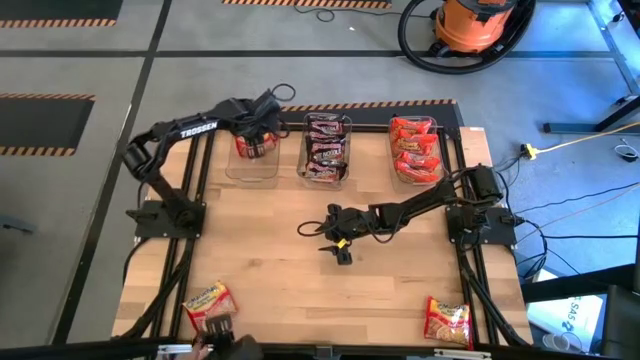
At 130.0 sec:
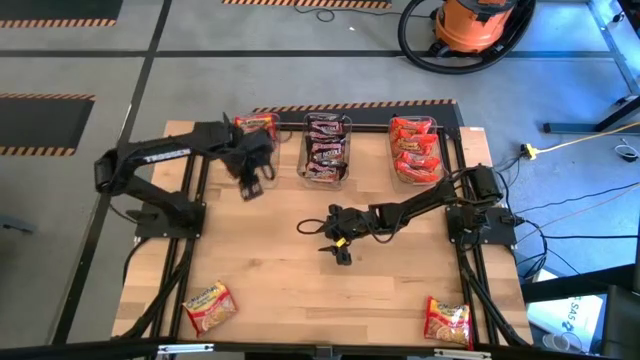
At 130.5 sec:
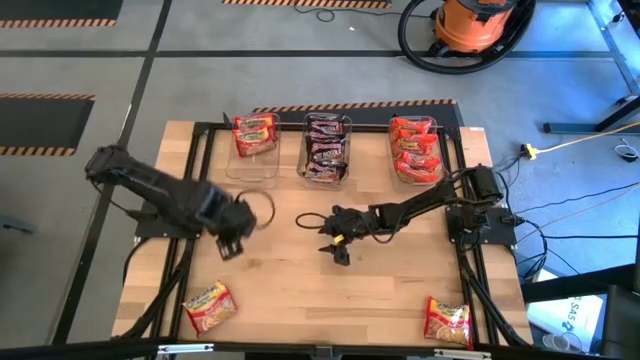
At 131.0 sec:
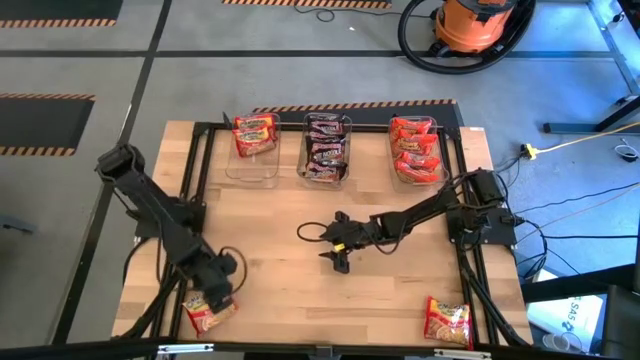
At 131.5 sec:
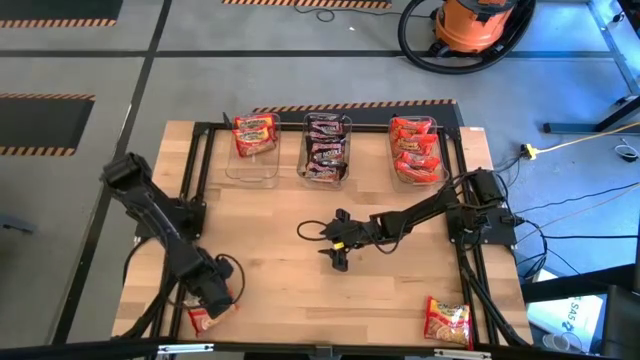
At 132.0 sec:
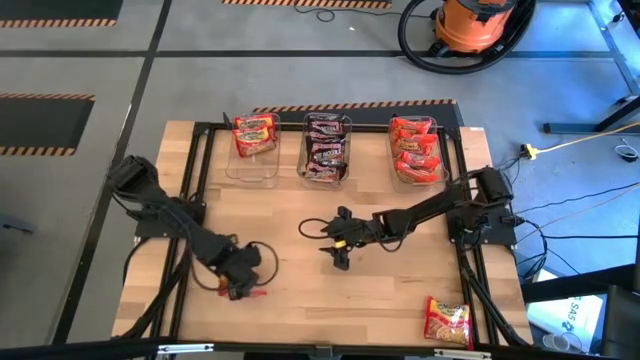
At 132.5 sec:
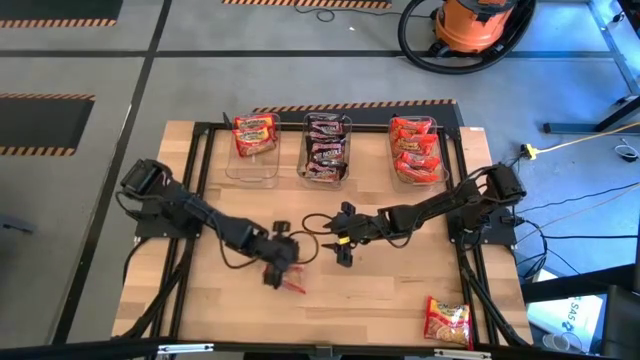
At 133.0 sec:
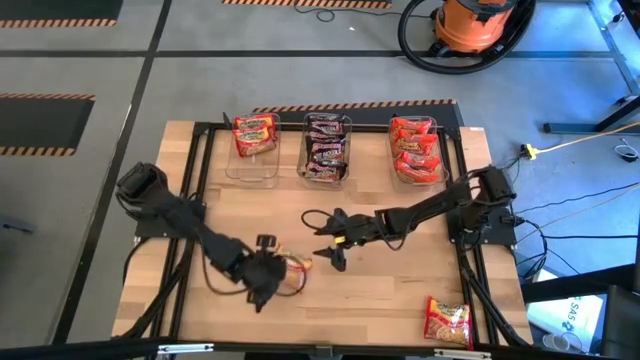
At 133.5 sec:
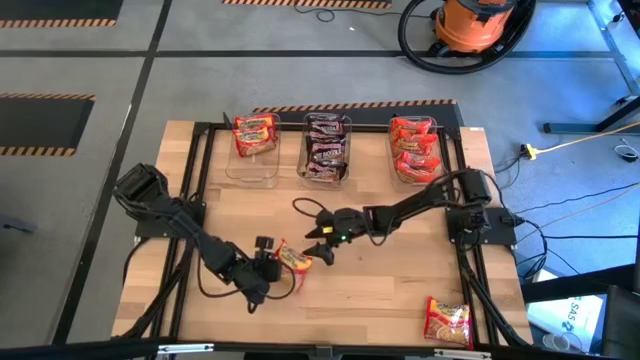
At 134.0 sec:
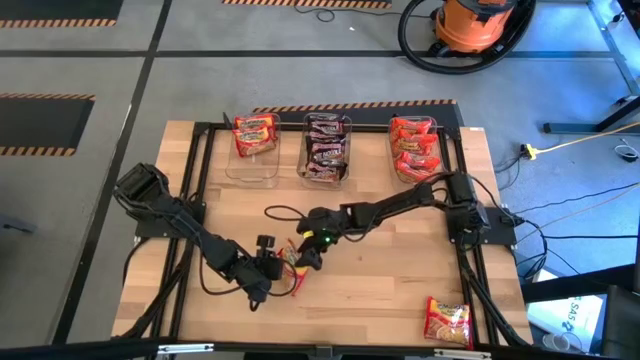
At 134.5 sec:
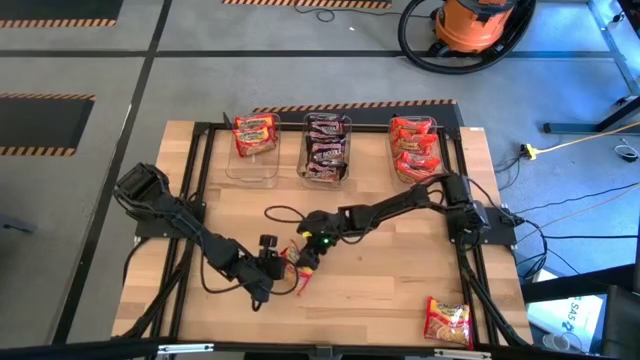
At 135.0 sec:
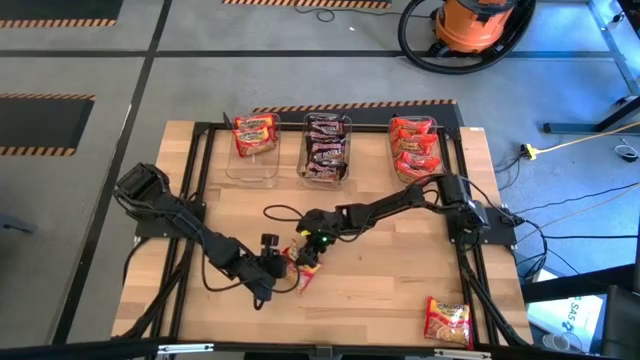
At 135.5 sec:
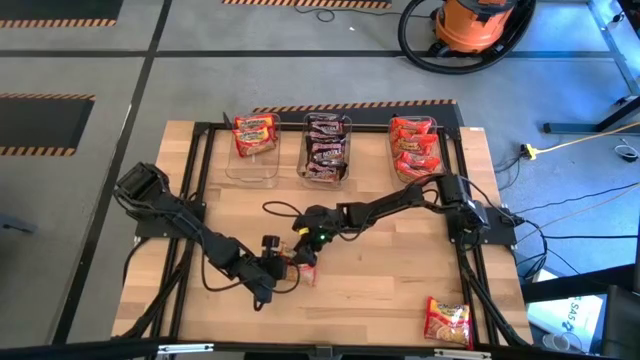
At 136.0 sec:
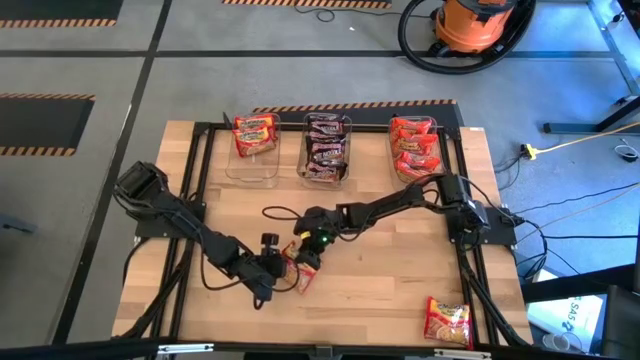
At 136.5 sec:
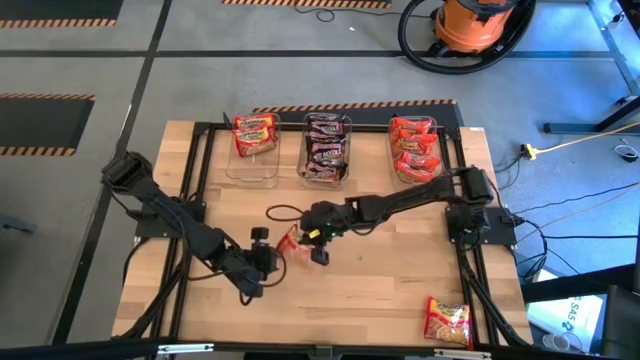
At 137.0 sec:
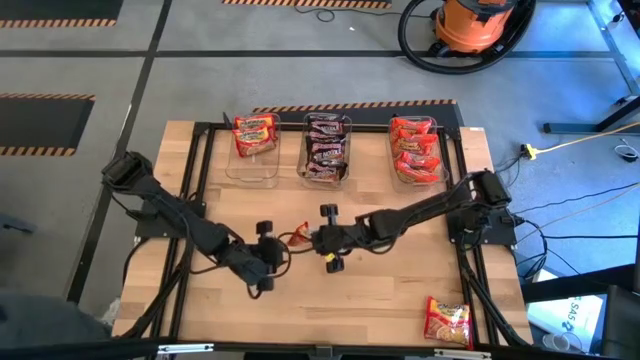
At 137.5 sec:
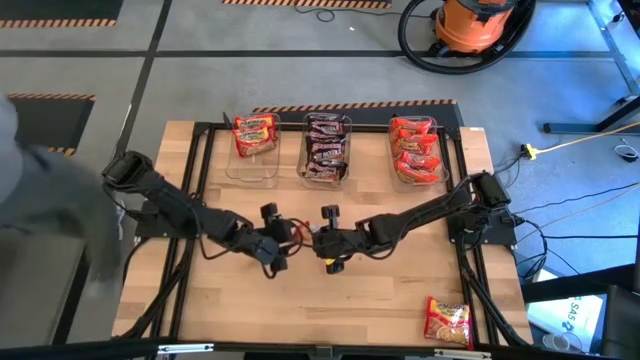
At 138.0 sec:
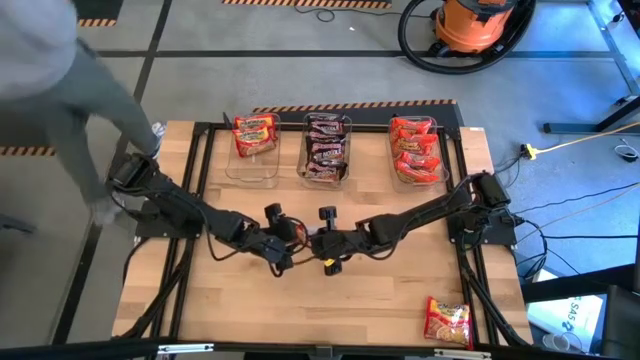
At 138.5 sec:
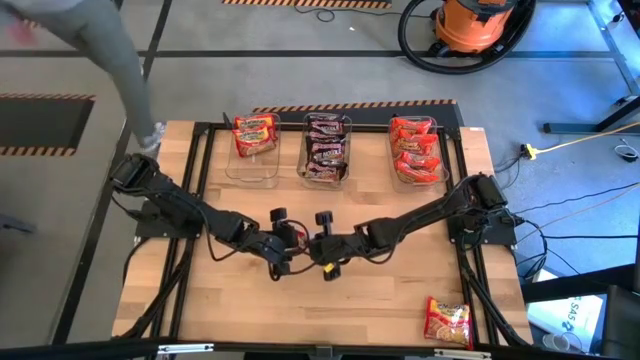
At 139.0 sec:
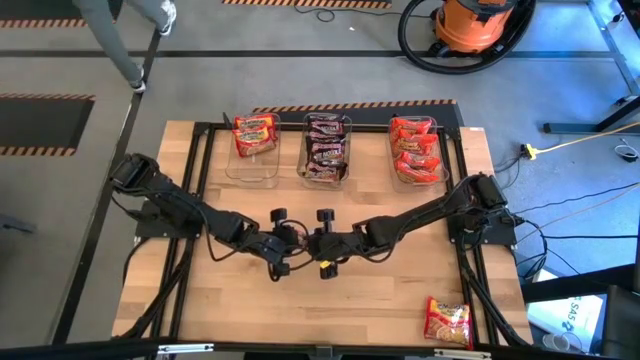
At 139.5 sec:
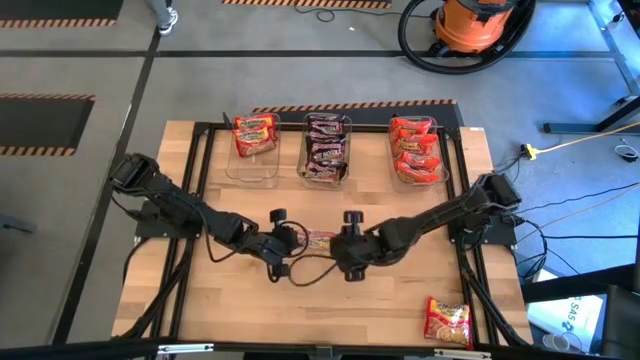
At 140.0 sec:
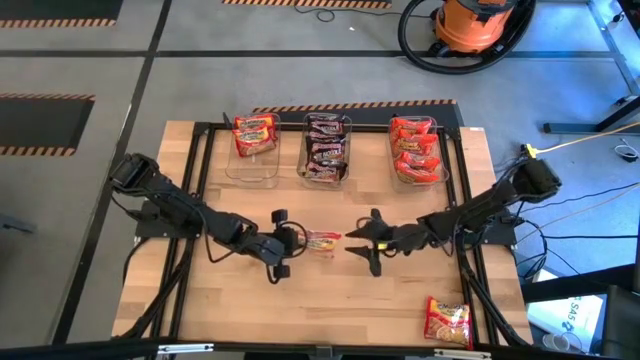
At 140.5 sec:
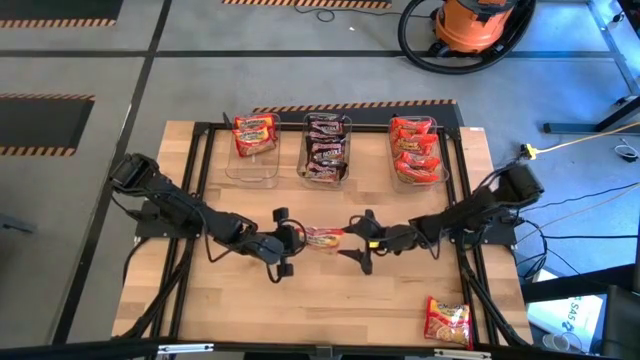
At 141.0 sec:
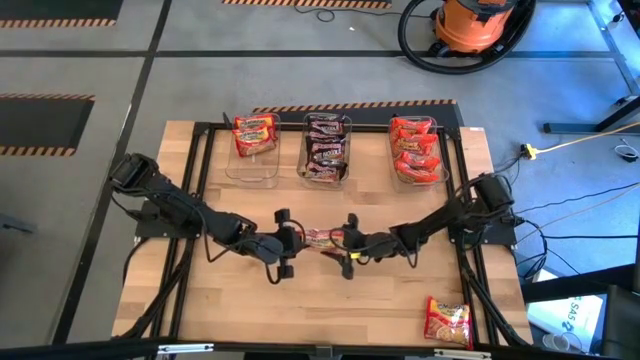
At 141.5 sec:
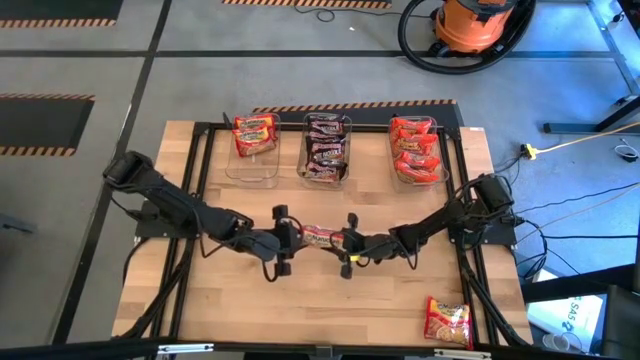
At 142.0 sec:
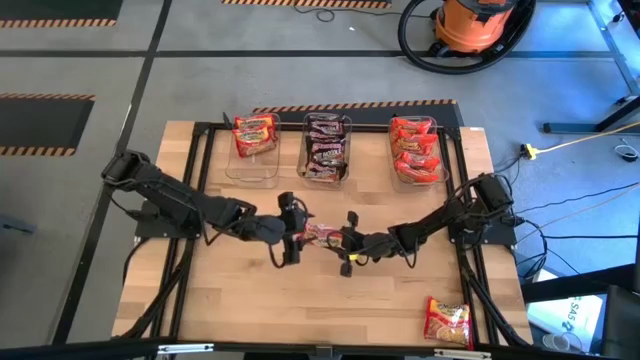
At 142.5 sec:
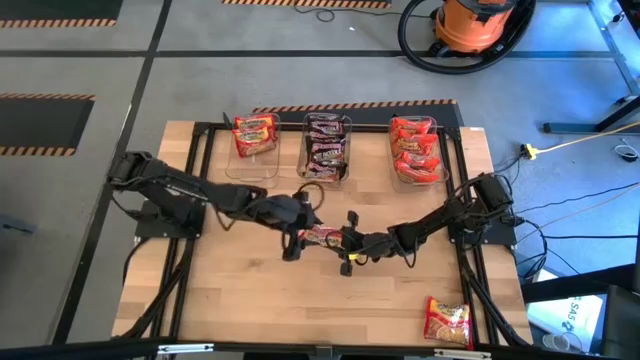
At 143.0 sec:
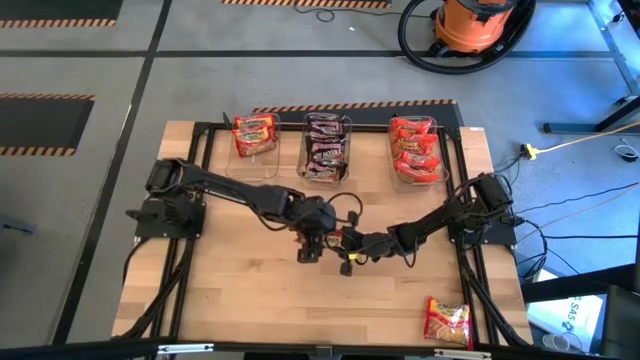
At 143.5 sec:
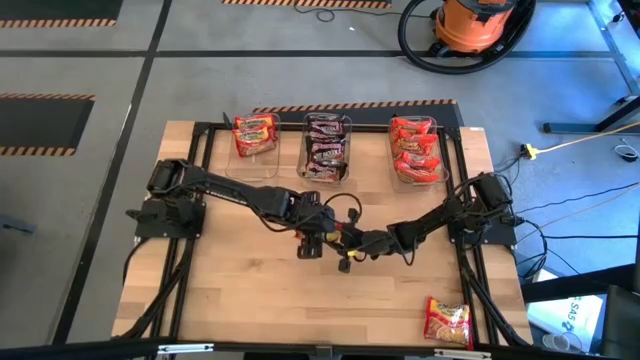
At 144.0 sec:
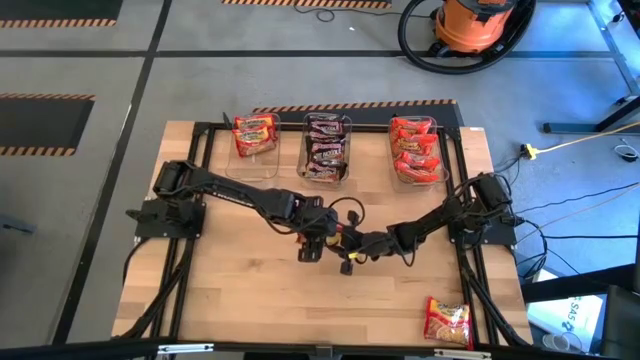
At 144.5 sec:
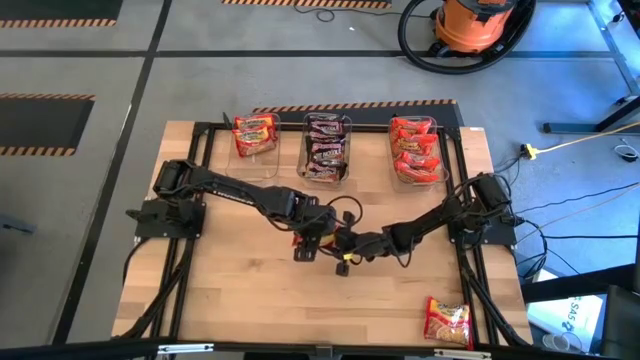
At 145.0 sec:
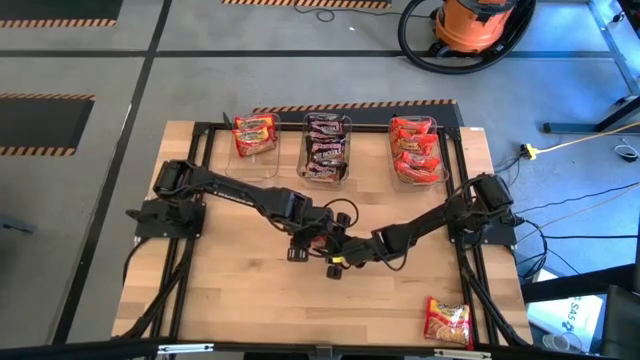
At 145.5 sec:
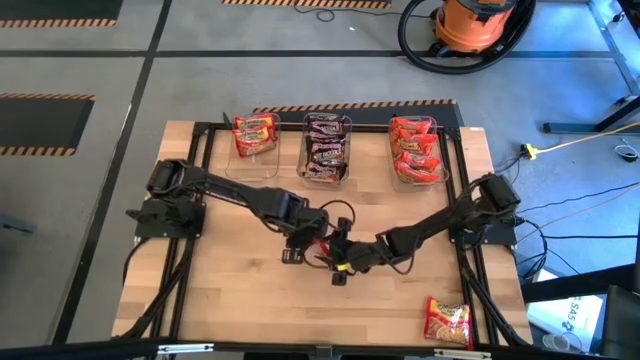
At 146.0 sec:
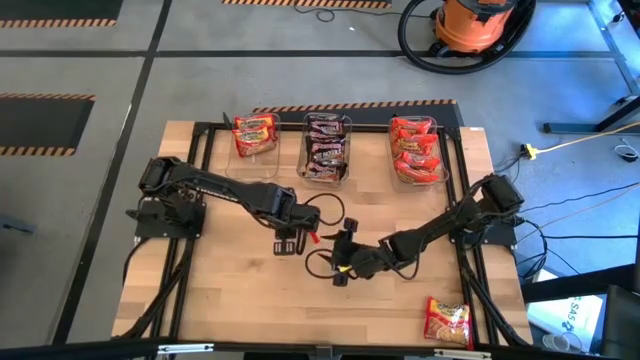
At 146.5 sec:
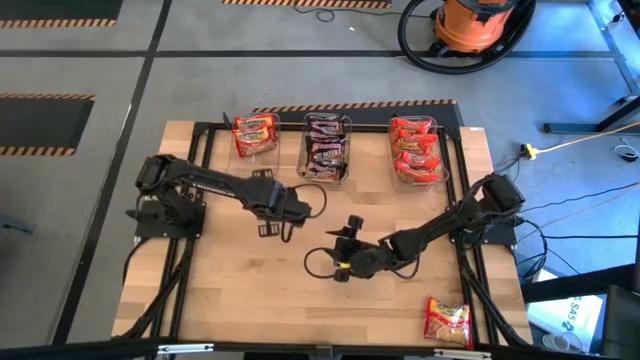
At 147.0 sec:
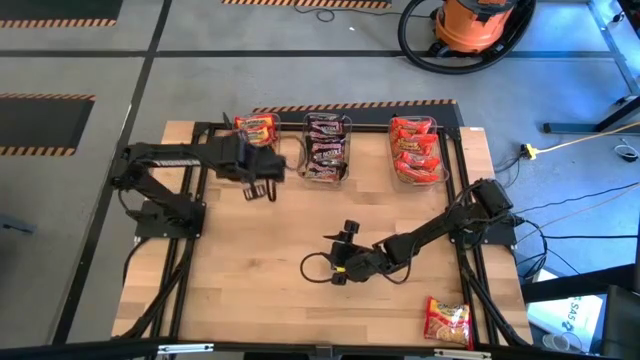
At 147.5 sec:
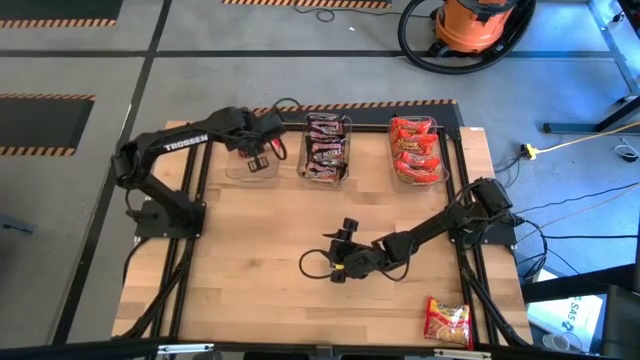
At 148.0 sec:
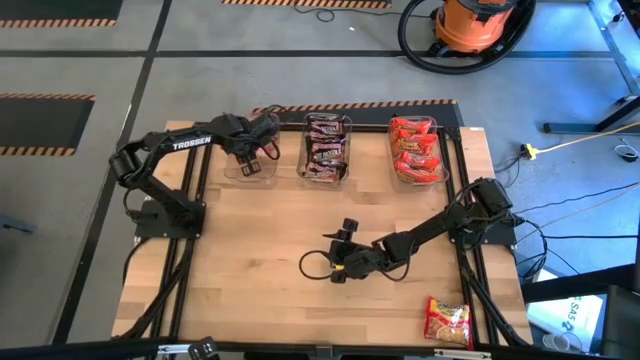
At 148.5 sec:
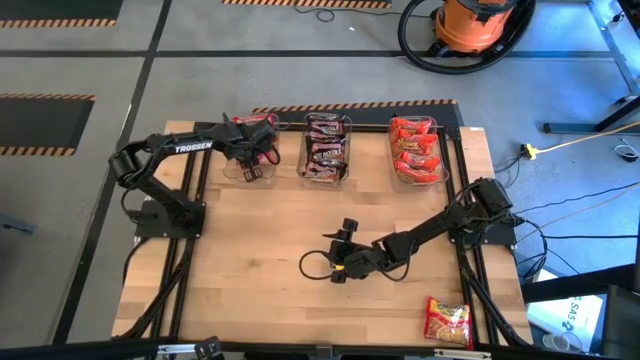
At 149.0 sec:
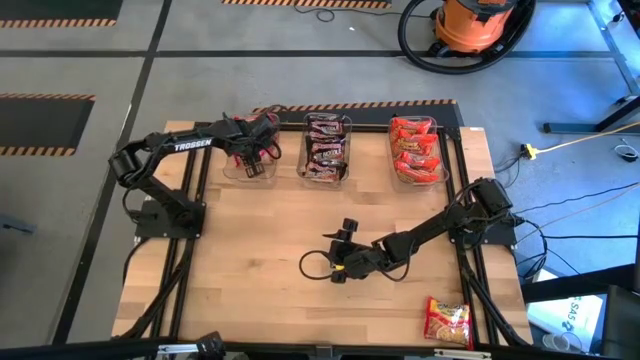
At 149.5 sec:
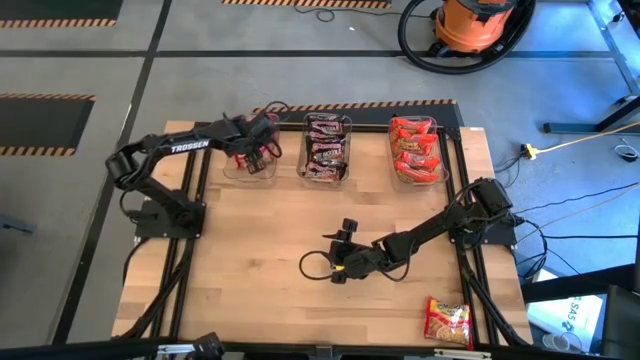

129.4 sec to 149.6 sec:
Task: Sort Maruchan noodles
Put the red noodle pack into the left transparent bin
